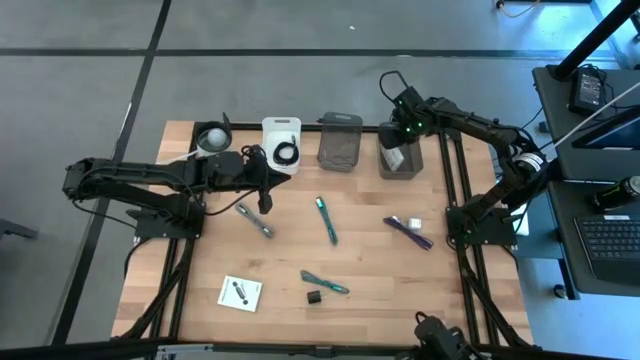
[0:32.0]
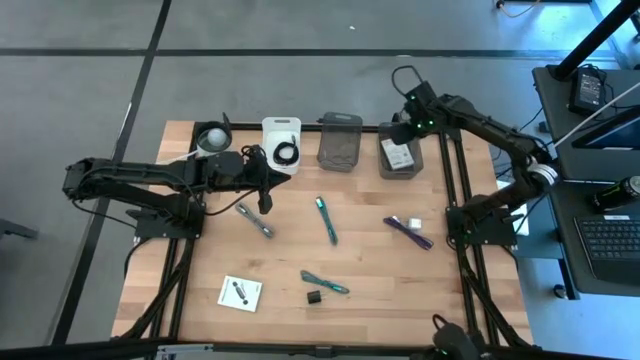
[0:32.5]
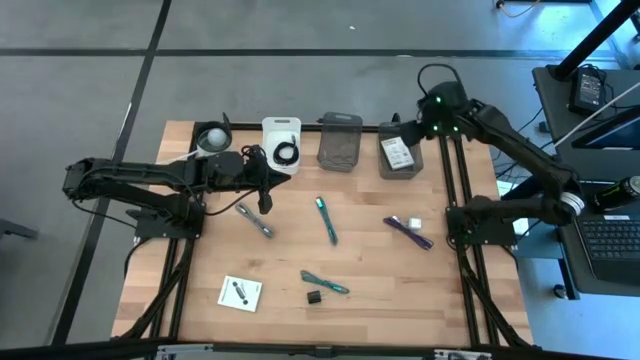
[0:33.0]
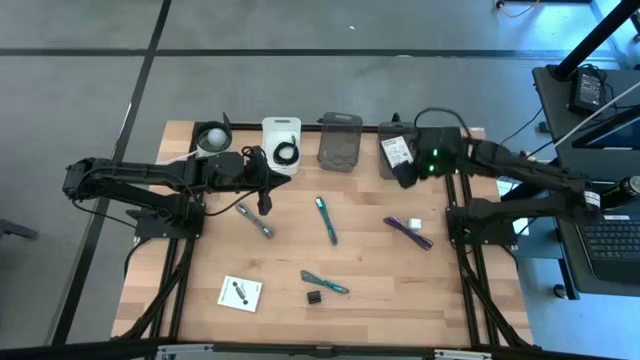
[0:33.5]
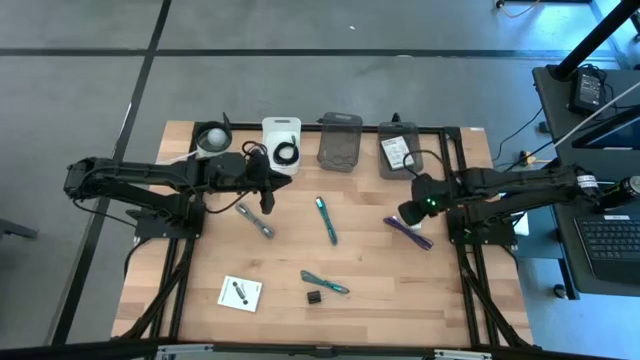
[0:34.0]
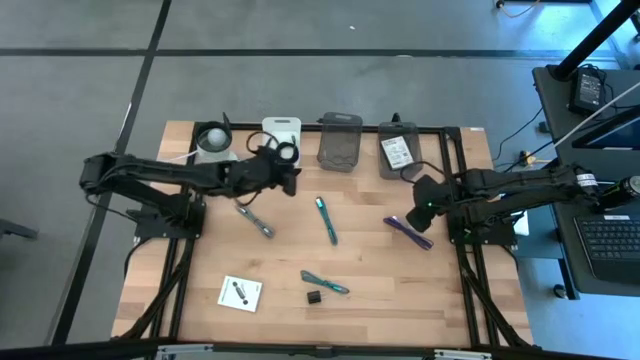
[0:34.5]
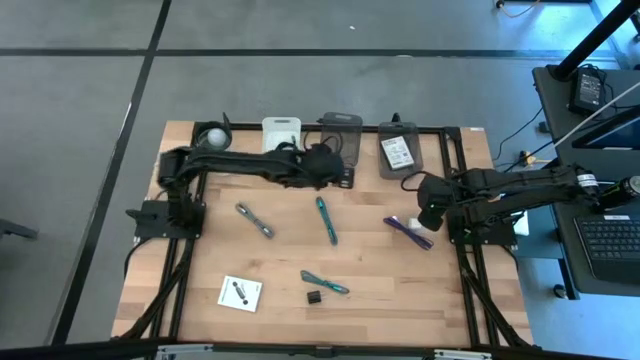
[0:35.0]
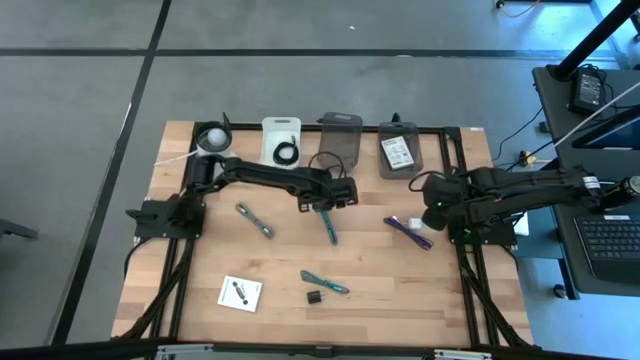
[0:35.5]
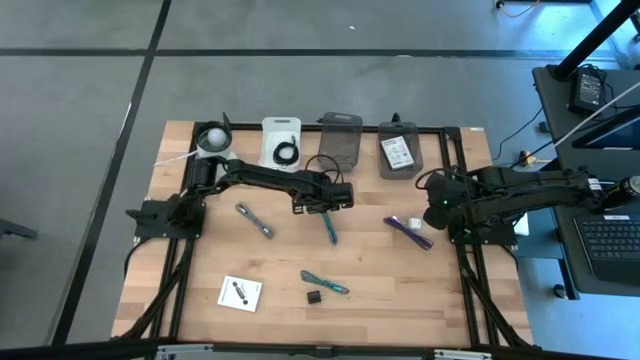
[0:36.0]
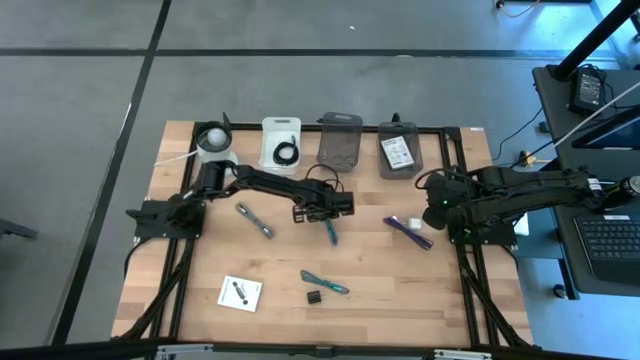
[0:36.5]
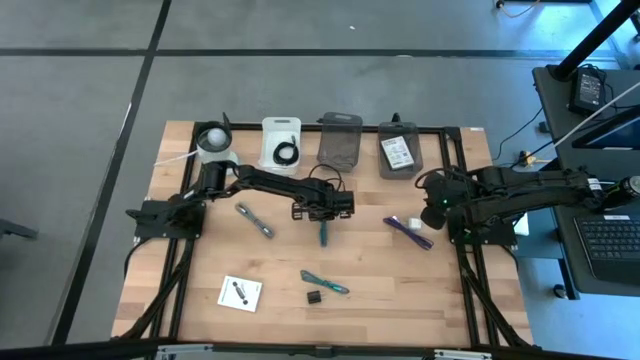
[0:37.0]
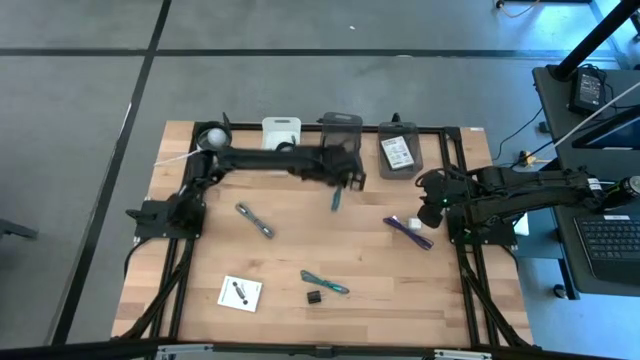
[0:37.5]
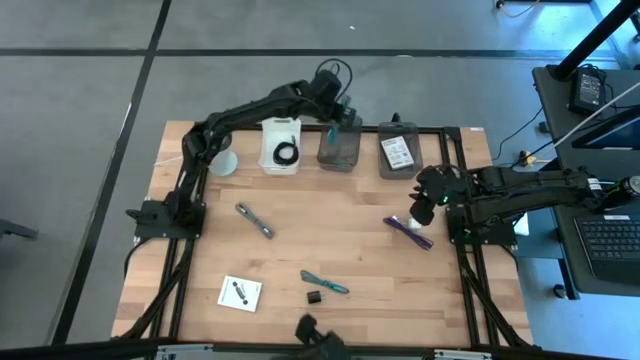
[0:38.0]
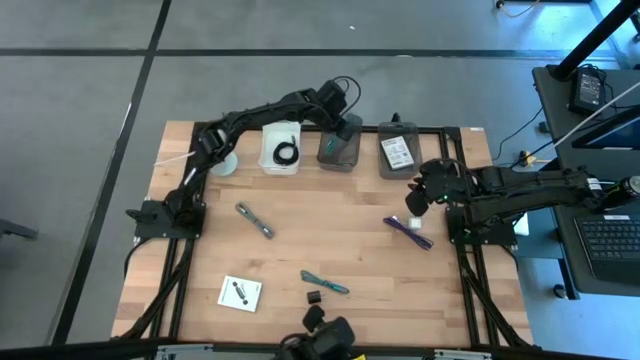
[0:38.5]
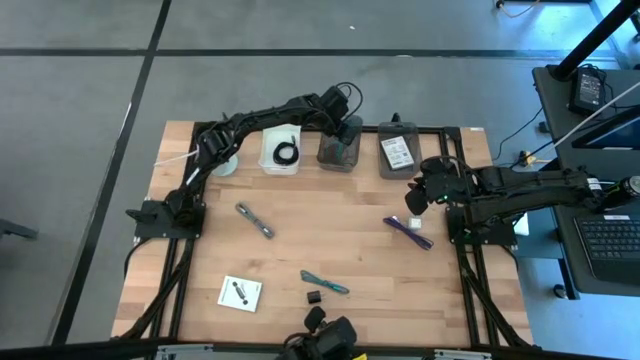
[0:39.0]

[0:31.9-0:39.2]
Task: Pick and place items into bin
Put the blue charger cable into the left black bin

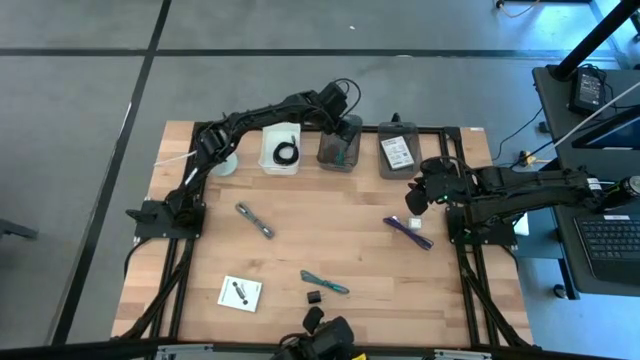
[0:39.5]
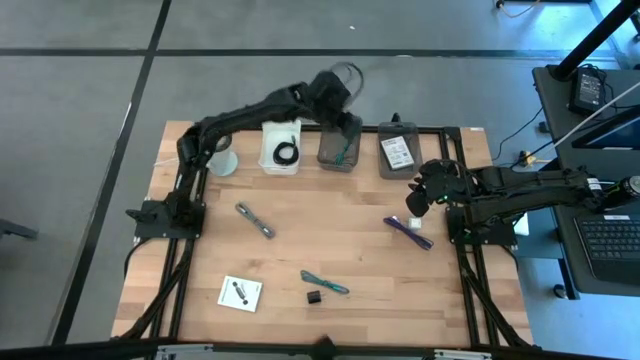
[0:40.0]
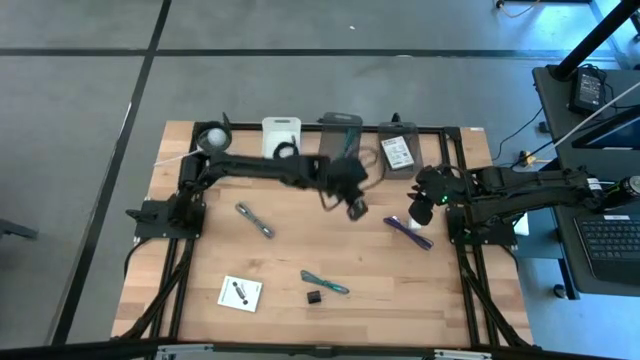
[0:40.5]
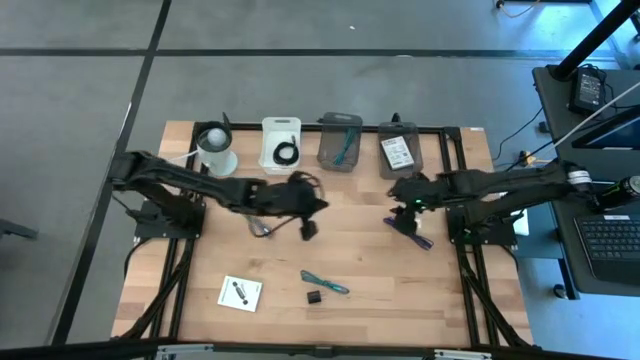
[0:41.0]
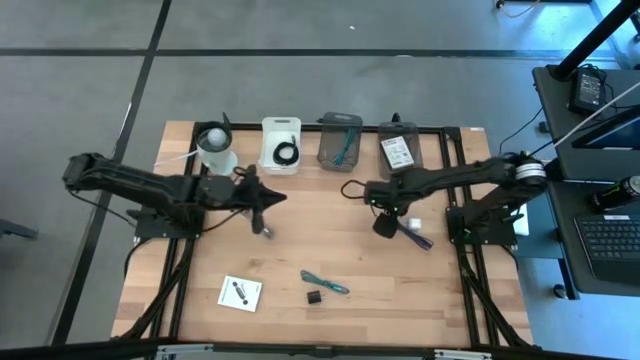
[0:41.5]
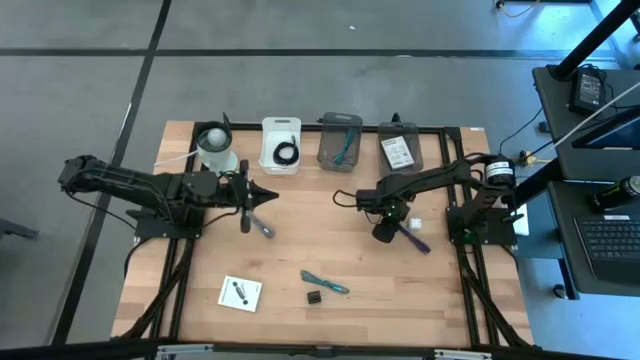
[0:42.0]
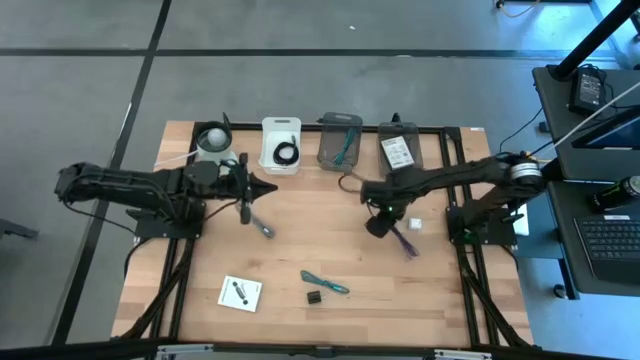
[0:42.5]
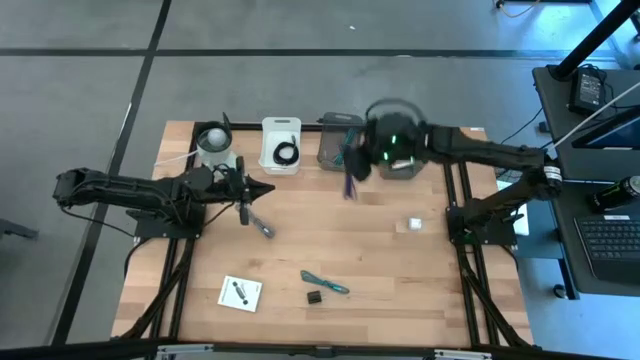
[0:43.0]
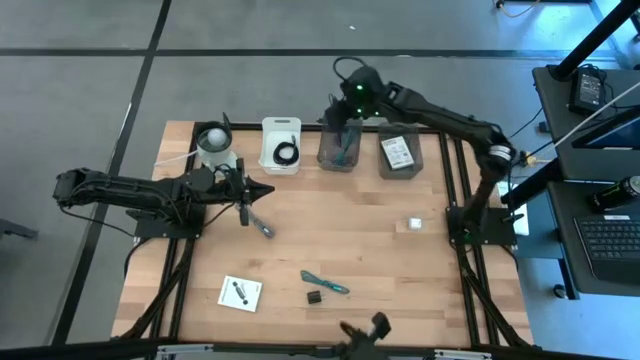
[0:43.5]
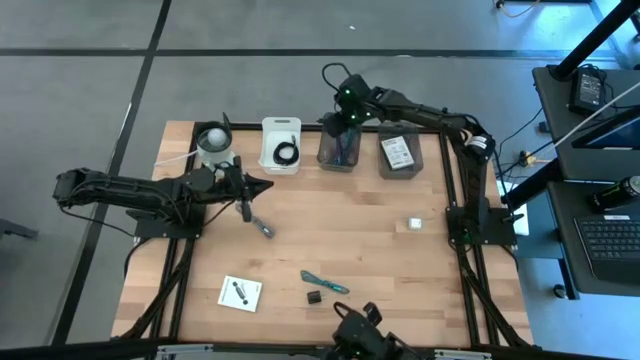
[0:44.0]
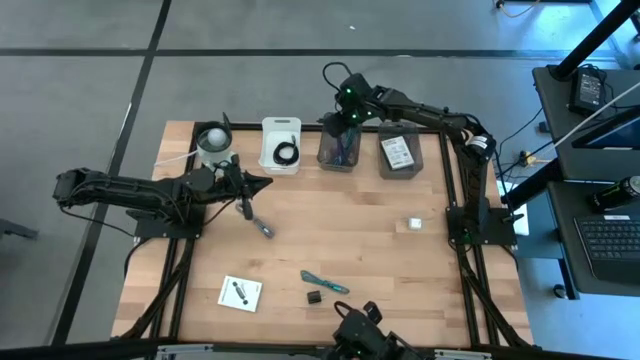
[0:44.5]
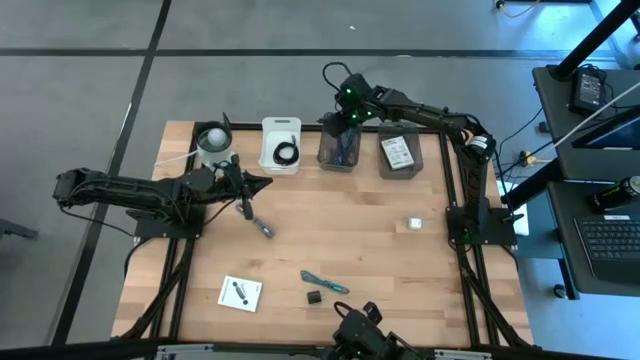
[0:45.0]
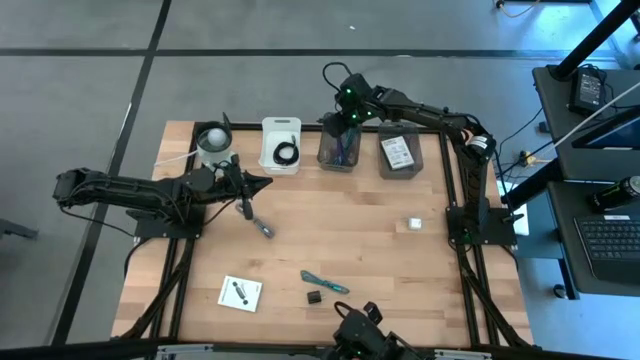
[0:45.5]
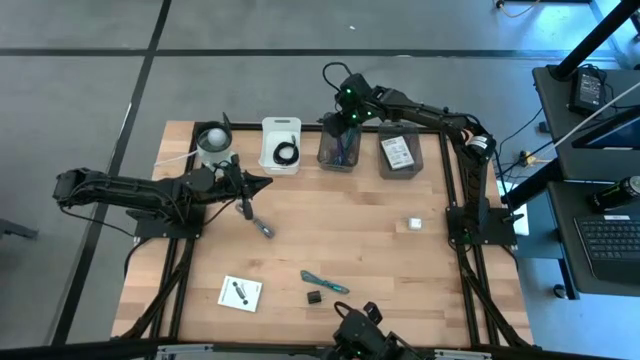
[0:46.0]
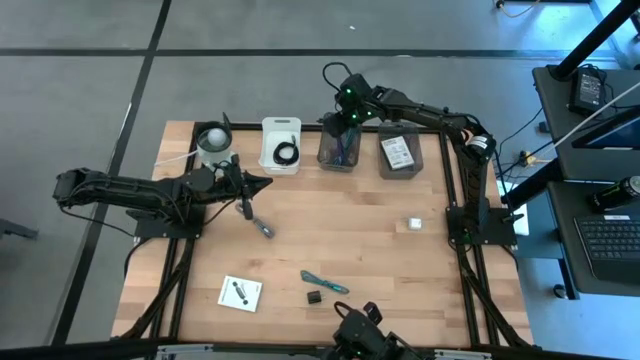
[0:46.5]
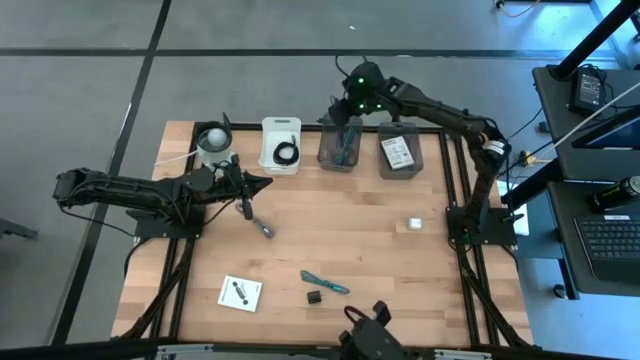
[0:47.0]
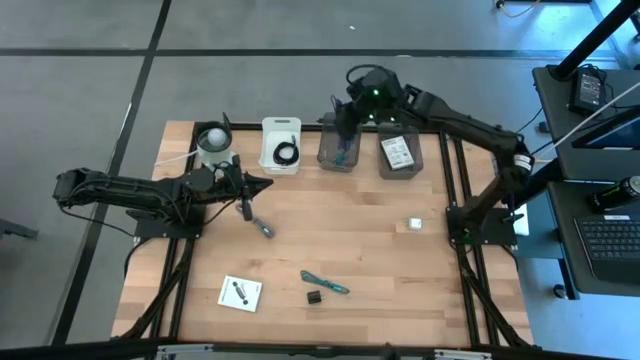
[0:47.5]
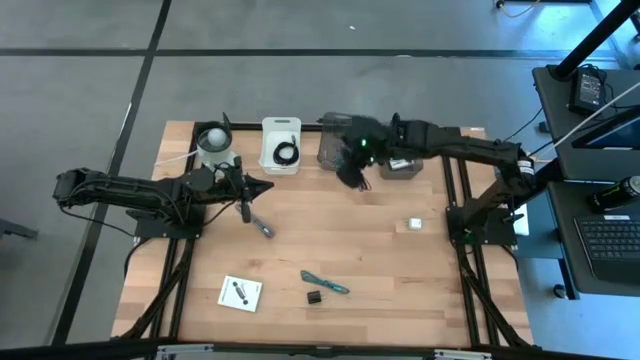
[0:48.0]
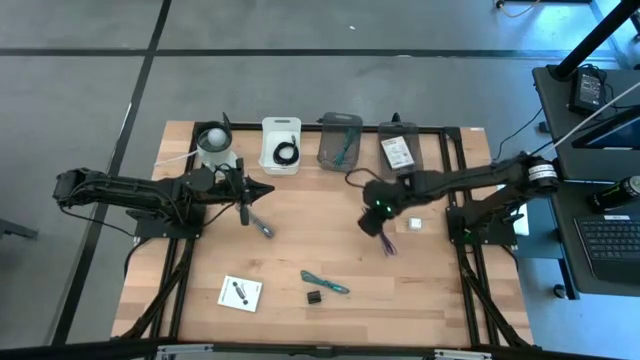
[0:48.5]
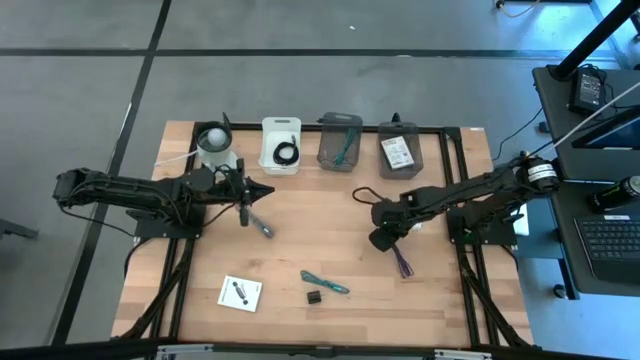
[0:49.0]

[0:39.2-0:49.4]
Put the violet charger cable into the left black bin

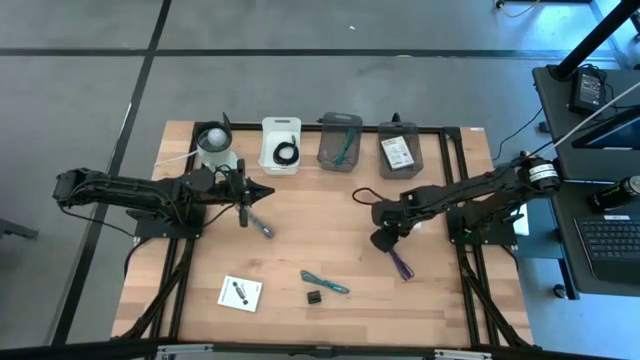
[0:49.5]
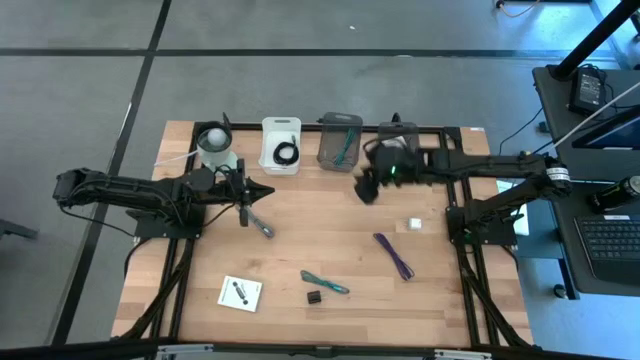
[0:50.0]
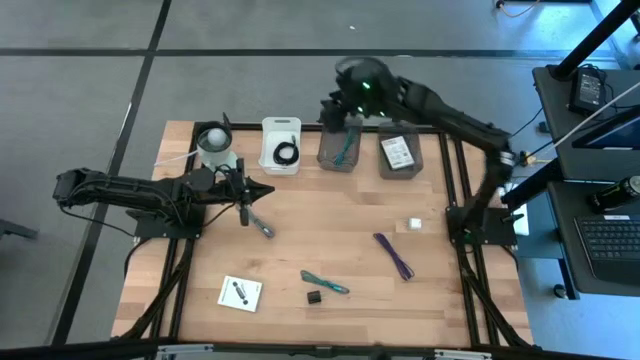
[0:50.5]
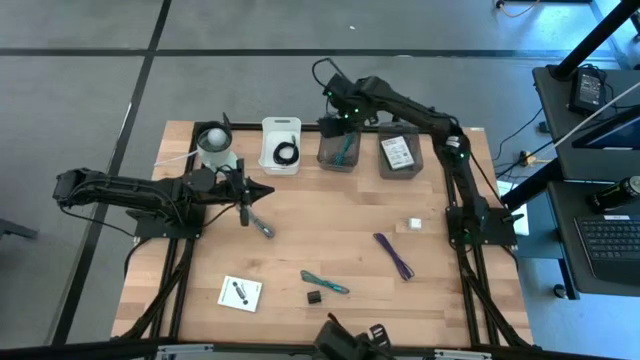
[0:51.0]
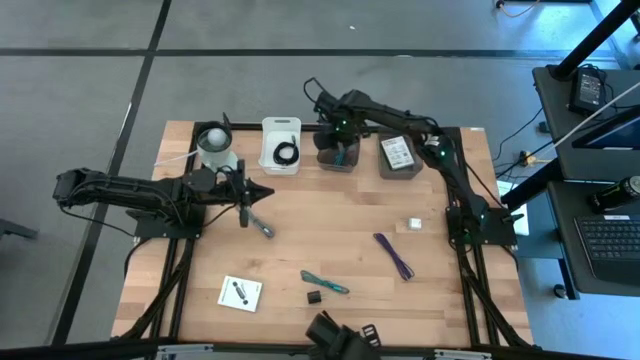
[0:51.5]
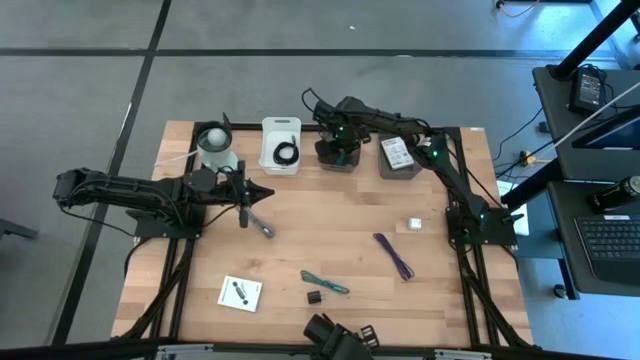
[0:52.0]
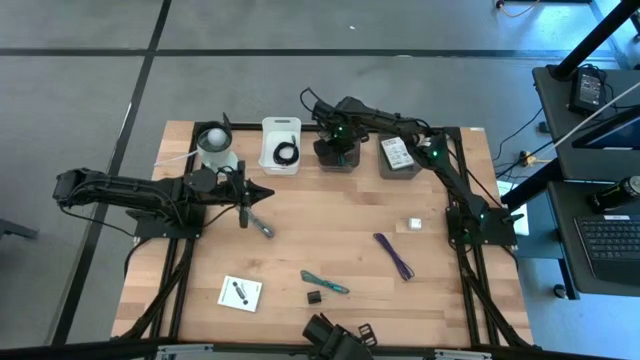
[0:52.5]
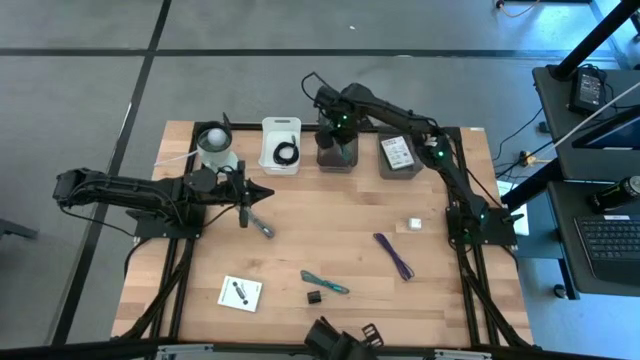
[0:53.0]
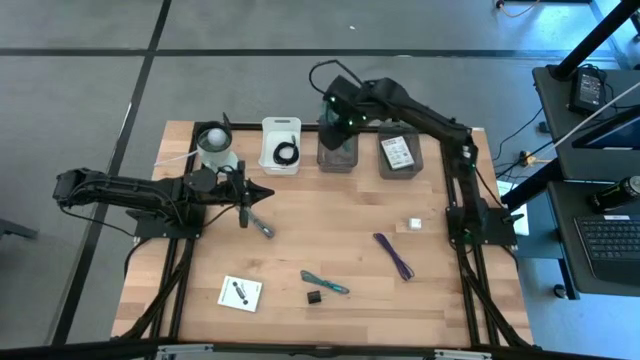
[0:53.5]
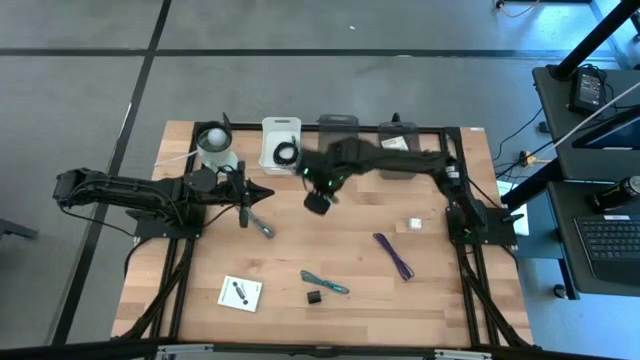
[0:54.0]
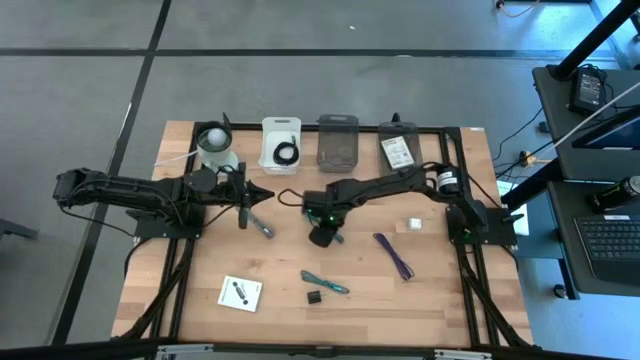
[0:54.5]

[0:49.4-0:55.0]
Remove the blue cable charger from the left black bin
